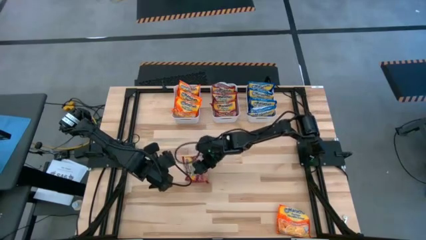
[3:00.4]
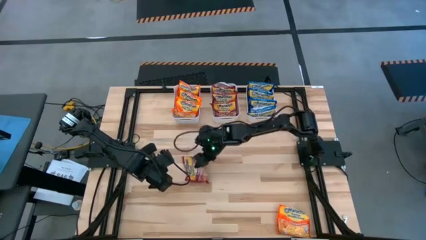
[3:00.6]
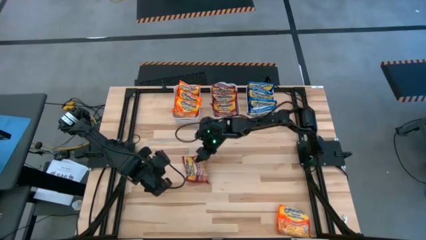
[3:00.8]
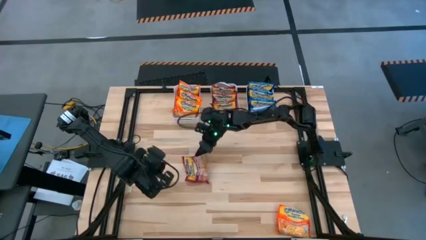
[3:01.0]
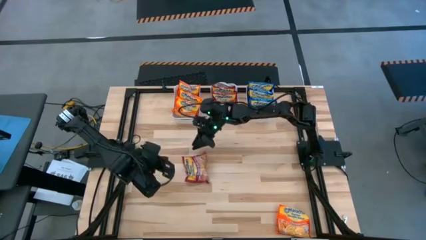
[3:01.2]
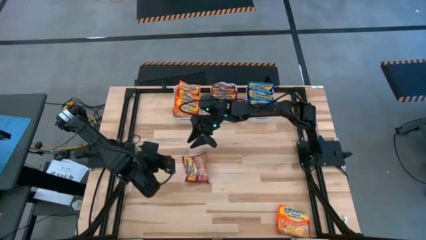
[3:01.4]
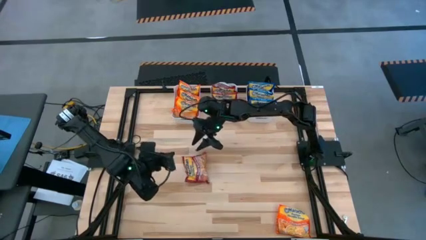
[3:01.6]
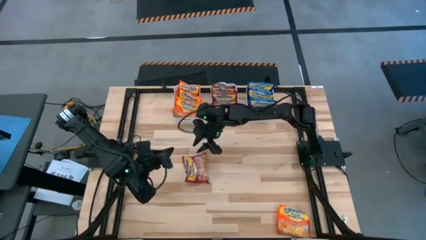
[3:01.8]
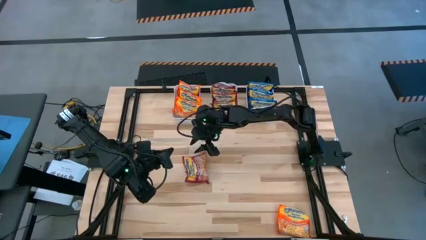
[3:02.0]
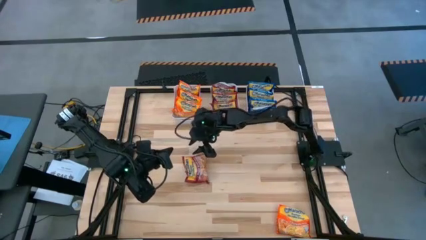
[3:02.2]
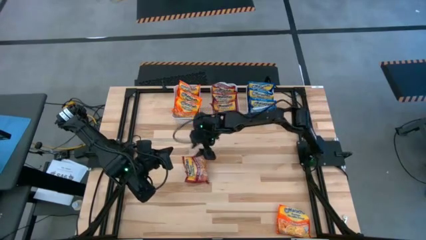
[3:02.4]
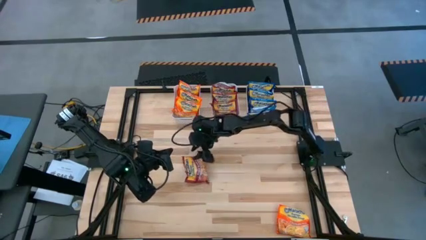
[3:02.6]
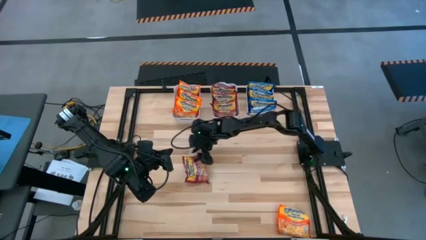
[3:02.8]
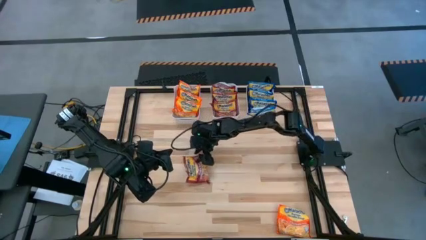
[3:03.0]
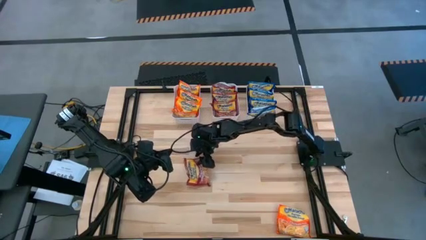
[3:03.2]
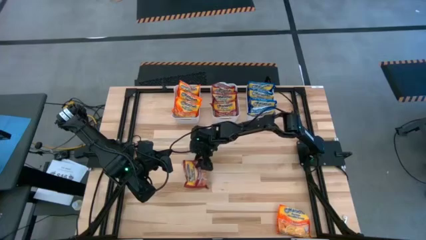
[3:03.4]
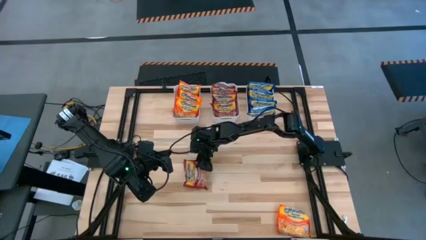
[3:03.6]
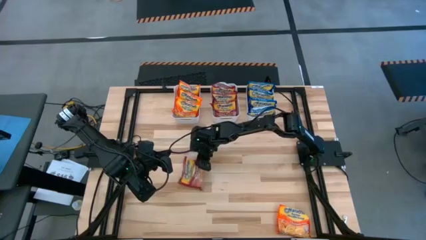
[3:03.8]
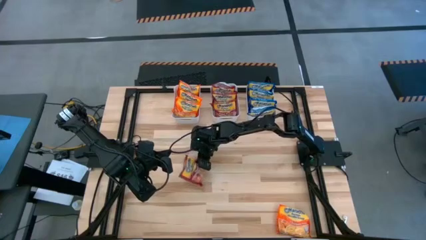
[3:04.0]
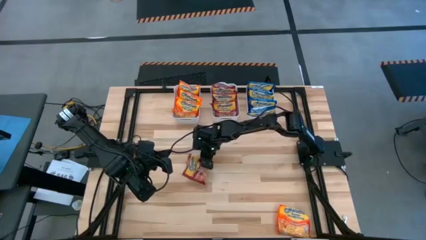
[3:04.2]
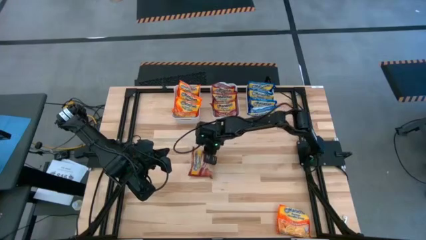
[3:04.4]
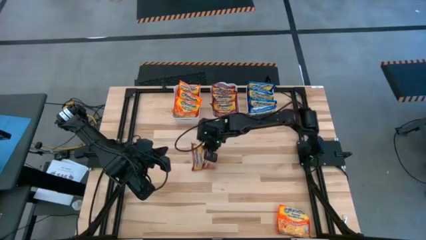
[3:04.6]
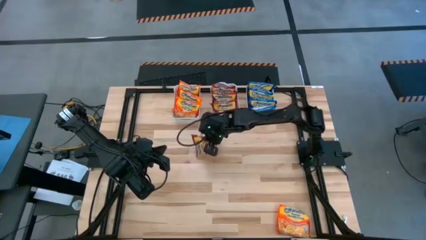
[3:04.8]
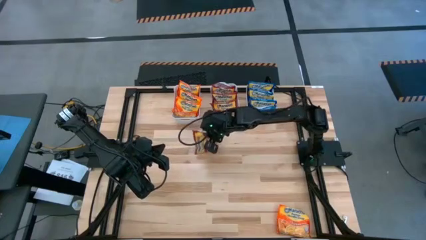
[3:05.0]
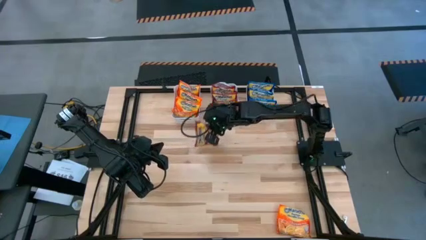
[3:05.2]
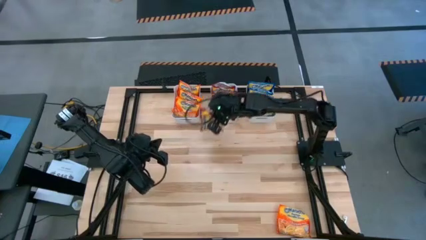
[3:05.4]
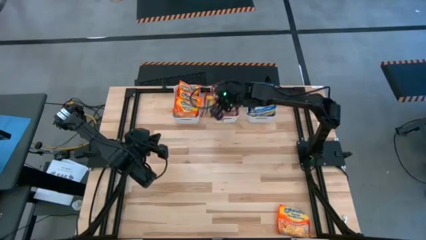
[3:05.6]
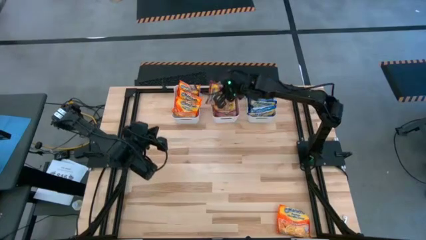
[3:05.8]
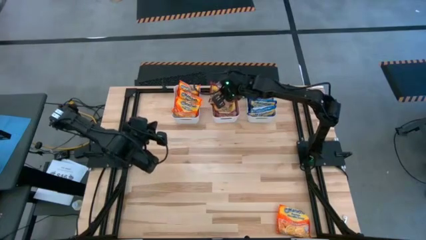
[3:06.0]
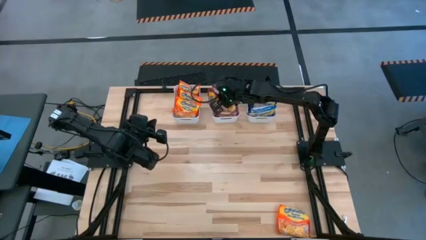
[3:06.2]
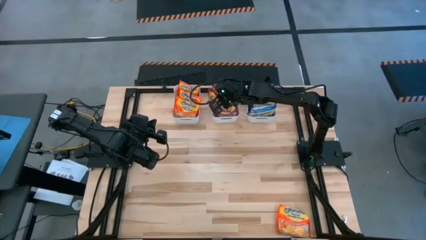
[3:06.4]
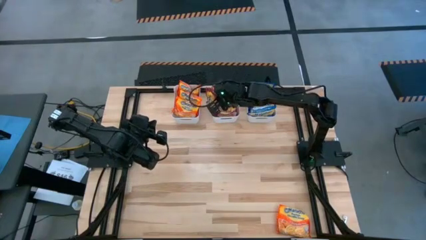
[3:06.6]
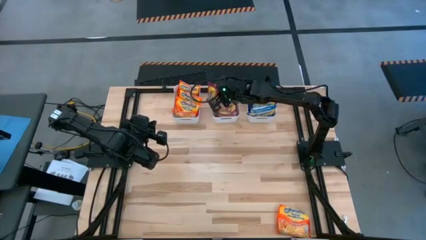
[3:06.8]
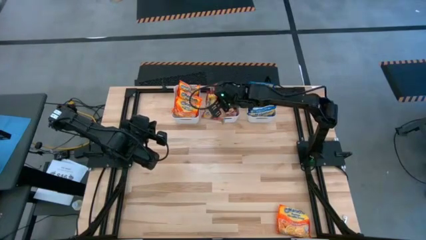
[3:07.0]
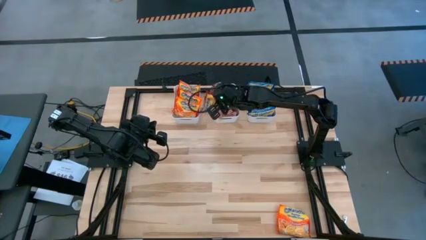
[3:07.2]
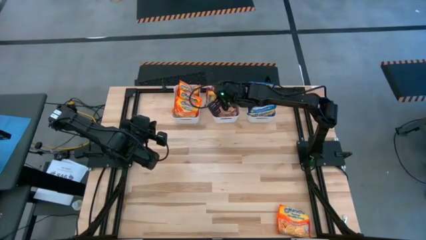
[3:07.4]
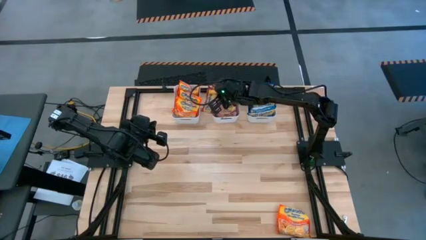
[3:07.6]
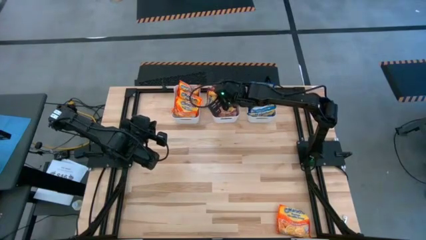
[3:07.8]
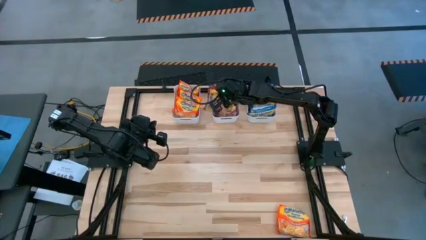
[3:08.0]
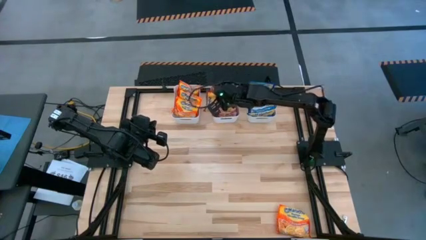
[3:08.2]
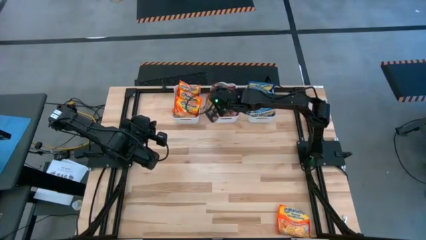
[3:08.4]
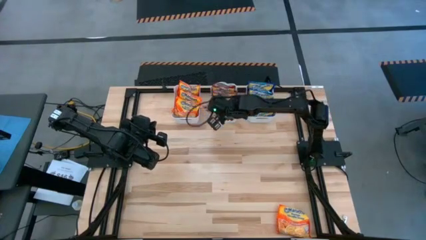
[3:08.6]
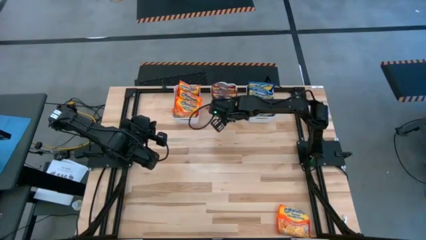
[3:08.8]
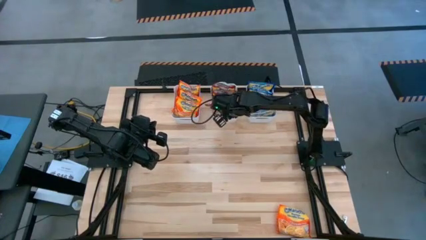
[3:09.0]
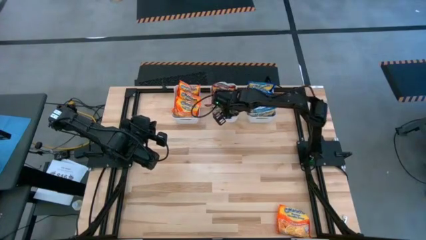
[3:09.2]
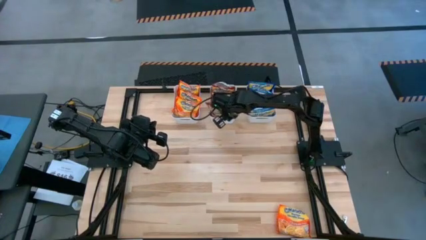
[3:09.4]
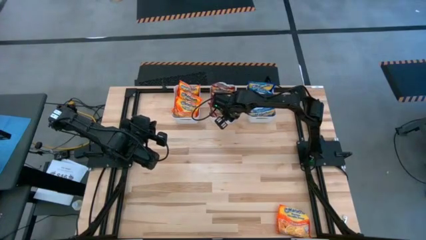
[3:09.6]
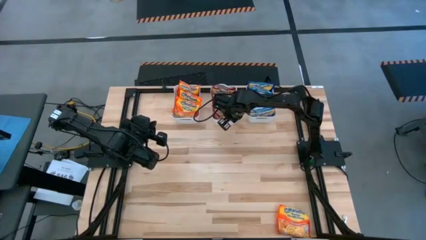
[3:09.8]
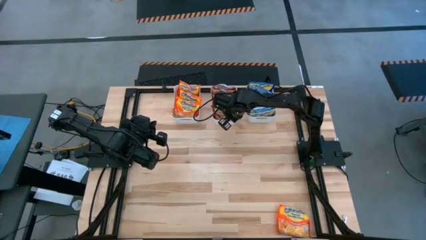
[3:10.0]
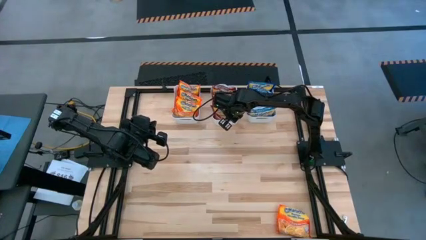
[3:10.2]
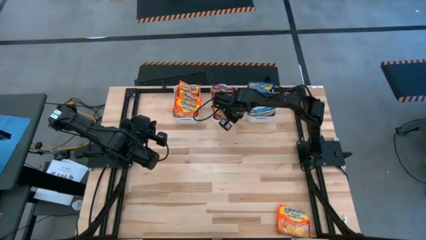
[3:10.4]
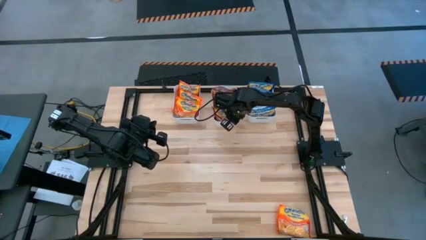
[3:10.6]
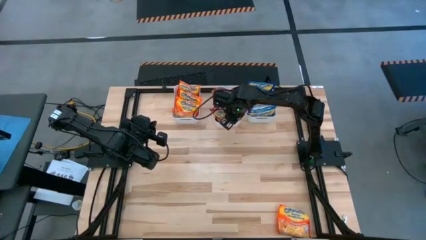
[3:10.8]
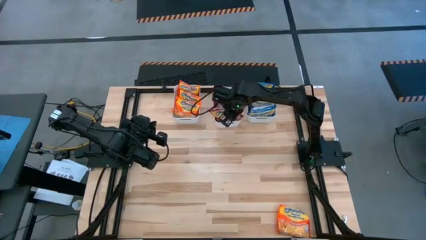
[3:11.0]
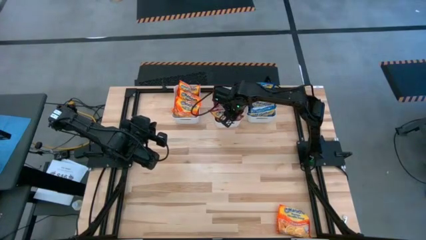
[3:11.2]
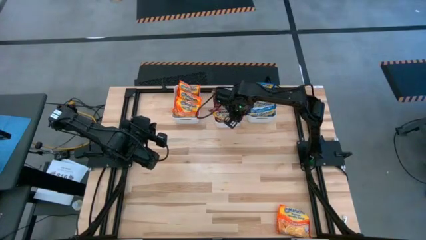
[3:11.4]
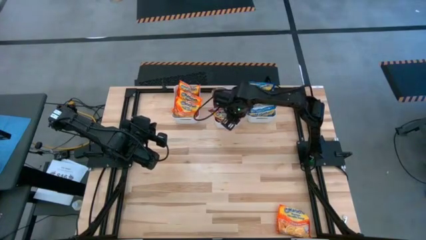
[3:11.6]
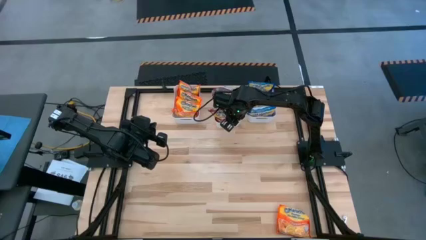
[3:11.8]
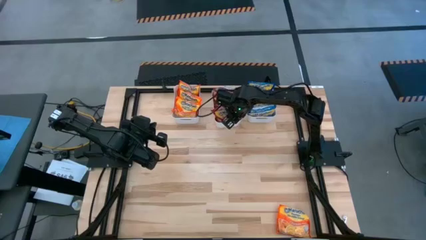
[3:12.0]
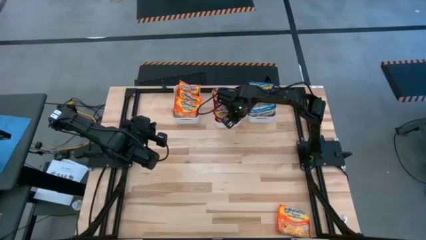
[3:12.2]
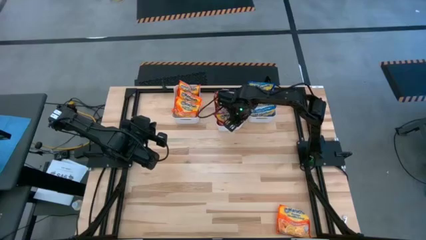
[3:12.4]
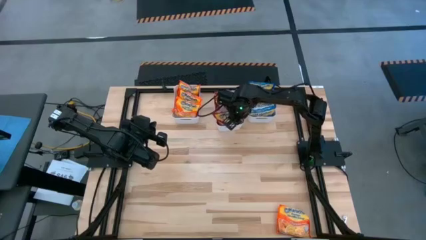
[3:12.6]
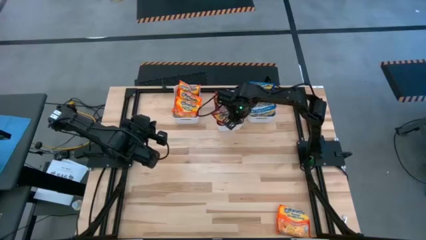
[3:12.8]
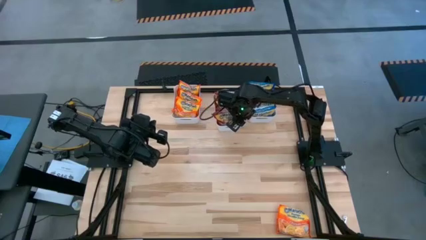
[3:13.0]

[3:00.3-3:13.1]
Task: Sort Maruchan noodles
Put the red noodle pack into the middle white bin

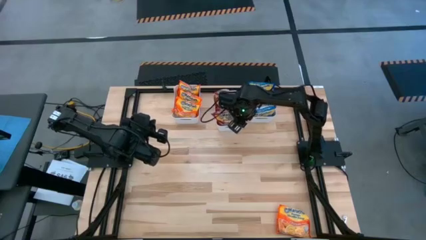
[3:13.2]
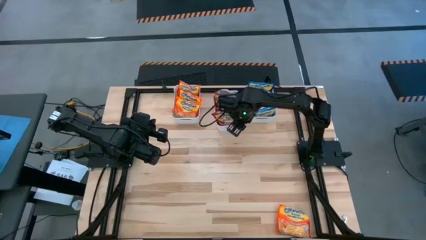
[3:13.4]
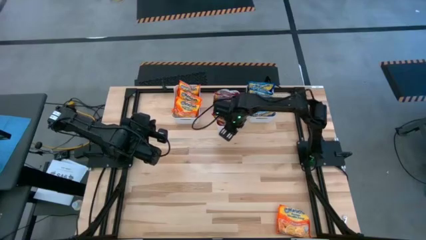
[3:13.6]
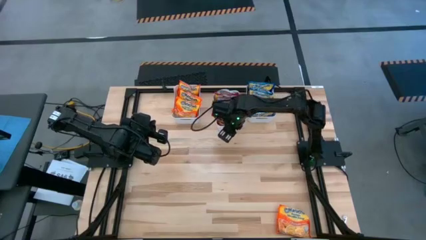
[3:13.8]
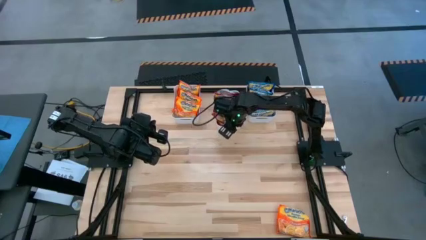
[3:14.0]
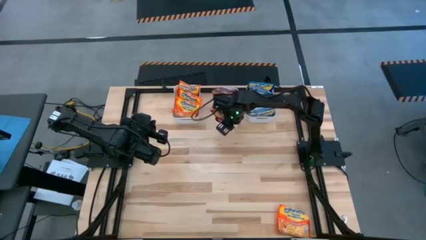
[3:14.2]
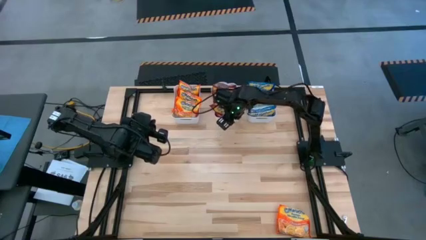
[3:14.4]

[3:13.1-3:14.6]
Adjust the middle white bin

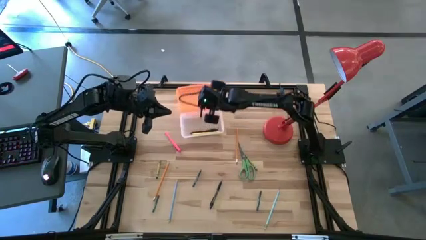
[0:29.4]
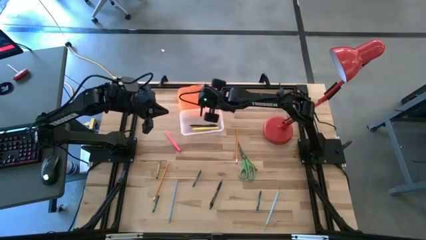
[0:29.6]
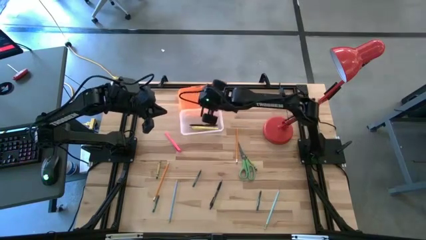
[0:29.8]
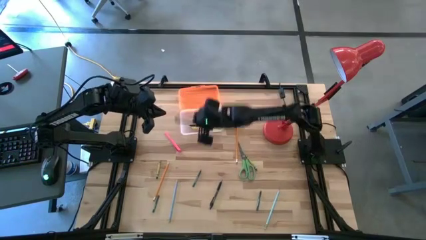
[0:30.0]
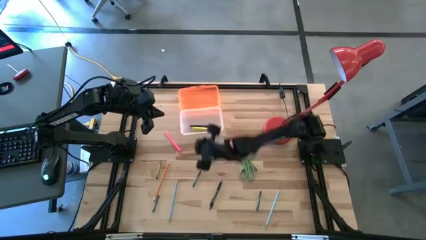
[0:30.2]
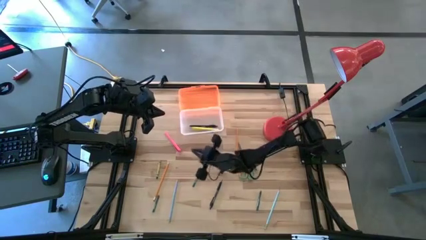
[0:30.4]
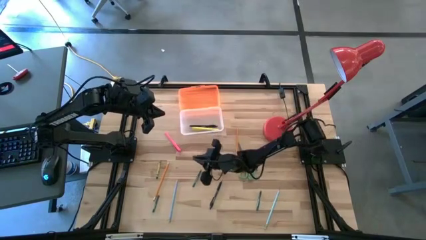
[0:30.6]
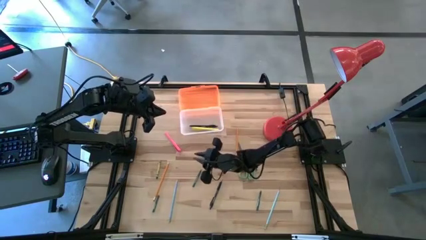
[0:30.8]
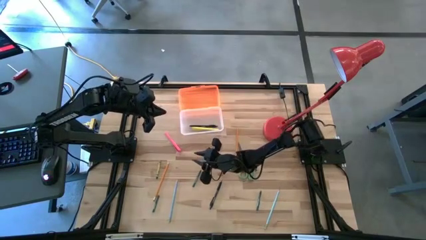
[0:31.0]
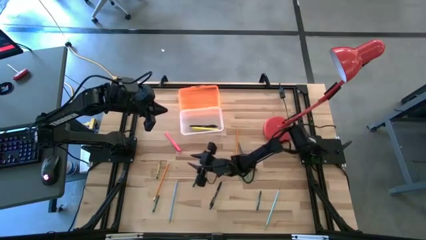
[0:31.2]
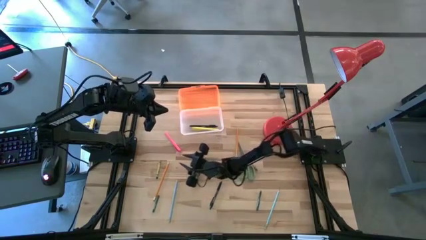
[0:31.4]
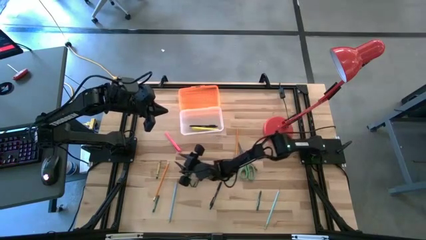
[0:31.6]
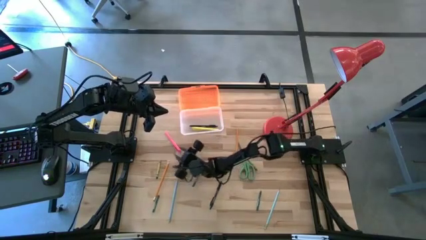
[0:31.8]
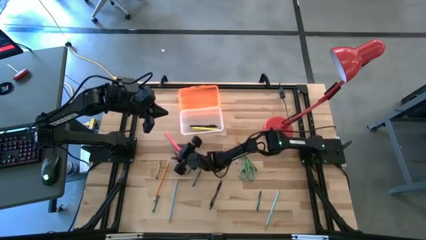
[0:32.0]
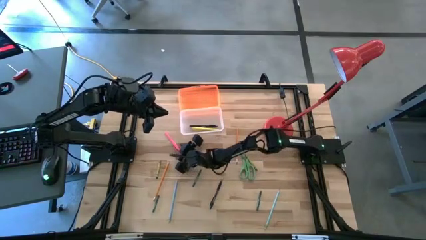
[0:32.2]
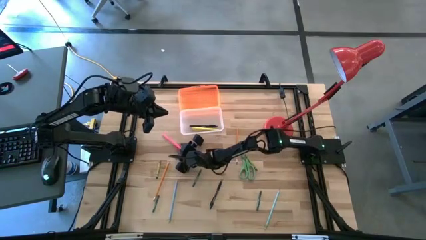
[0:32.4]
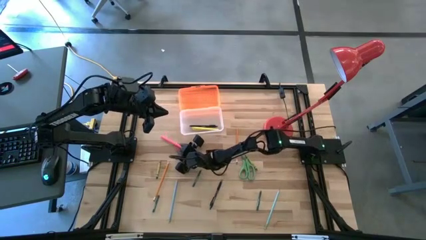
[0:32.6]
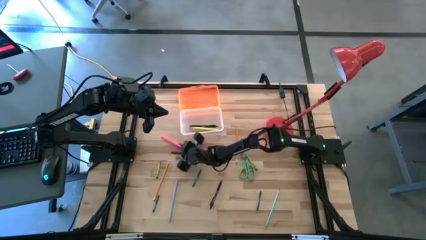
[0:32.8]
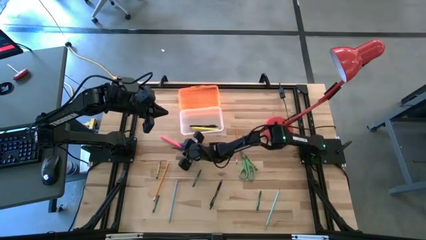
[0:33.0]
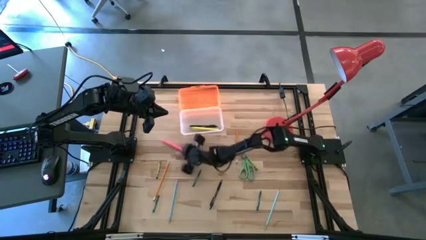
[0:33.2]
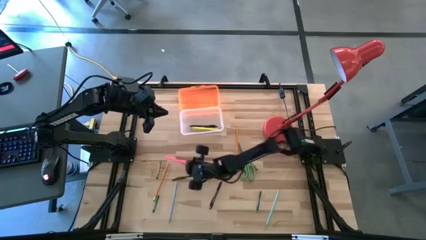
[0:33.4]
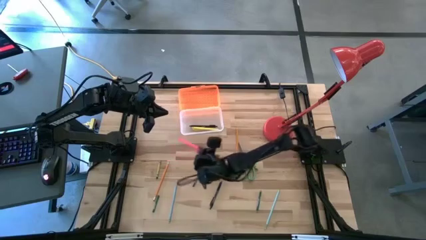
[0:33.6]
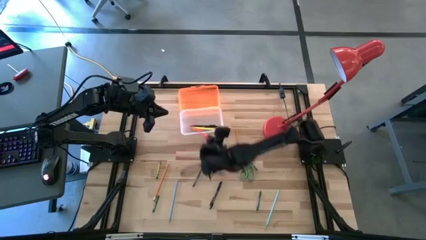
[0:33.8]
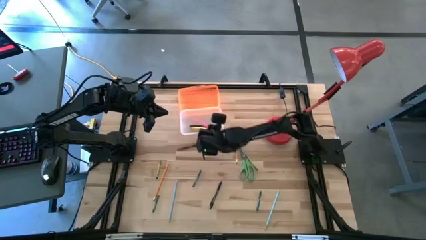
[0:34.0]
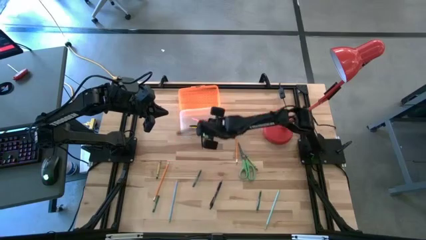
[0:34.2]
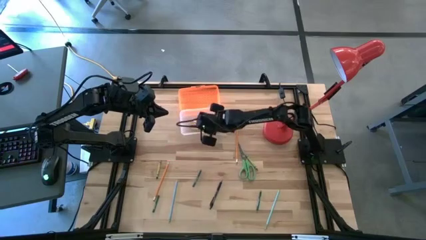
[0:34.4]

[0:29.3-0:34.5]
Task: Pick & place school supplies into a supply box
Put the pink pen into the orange supply box
